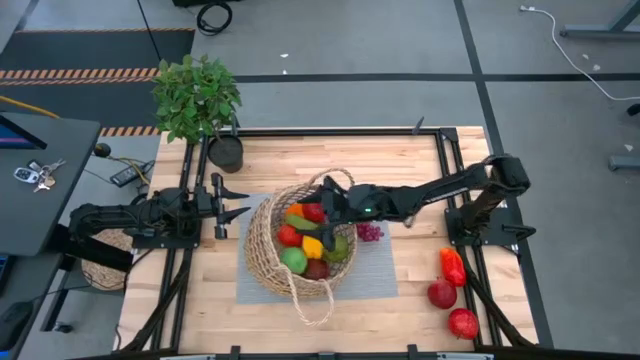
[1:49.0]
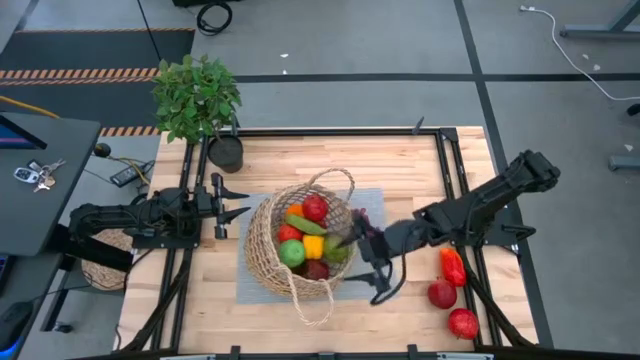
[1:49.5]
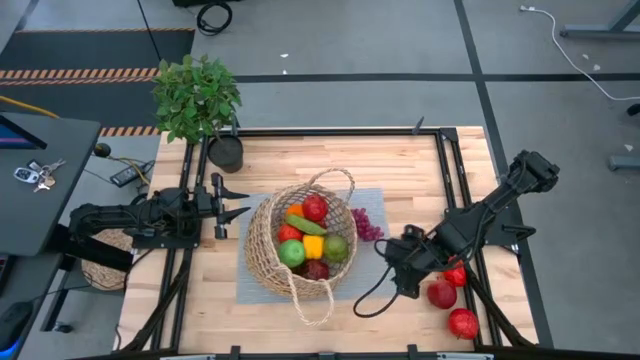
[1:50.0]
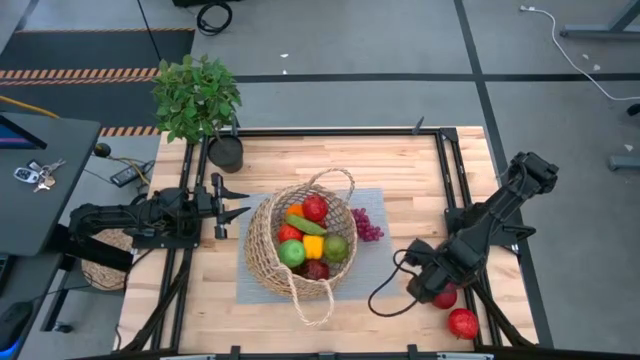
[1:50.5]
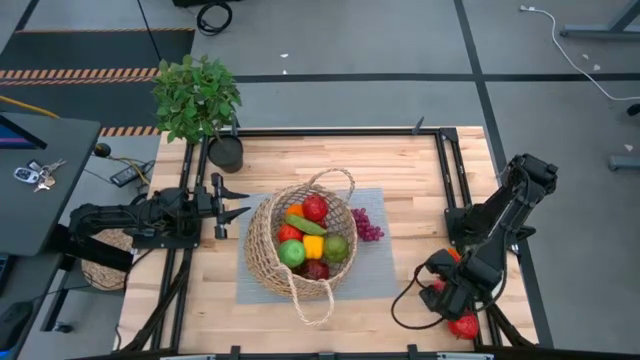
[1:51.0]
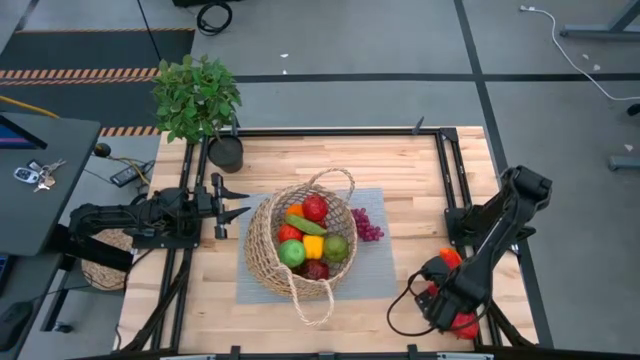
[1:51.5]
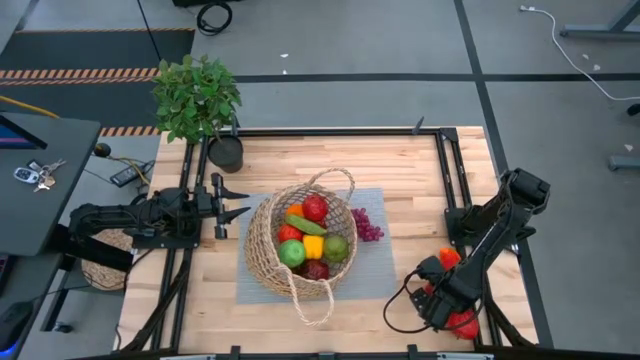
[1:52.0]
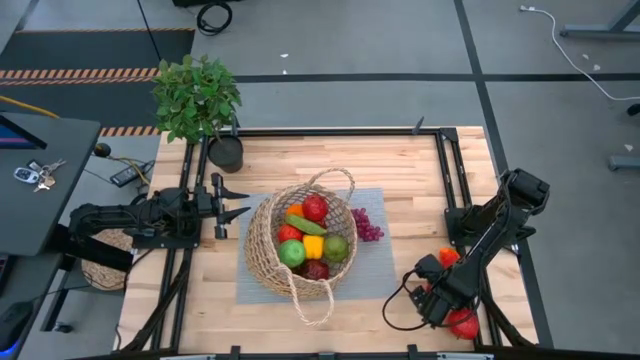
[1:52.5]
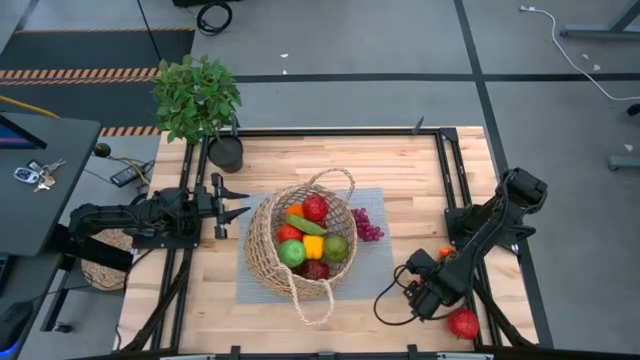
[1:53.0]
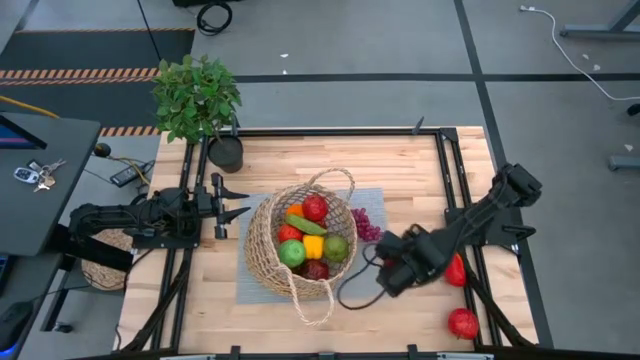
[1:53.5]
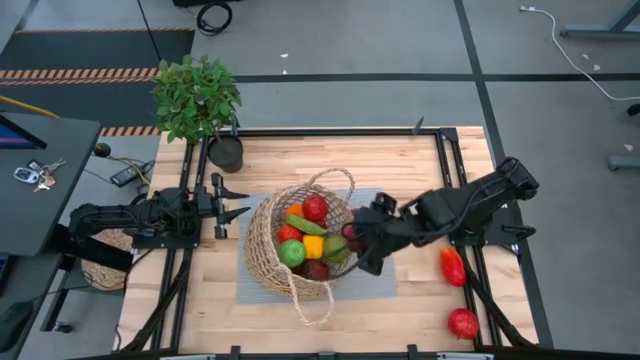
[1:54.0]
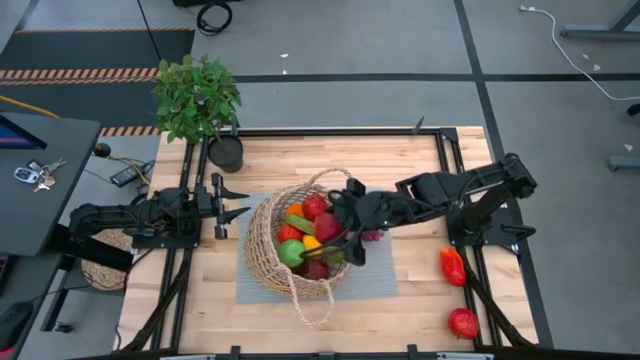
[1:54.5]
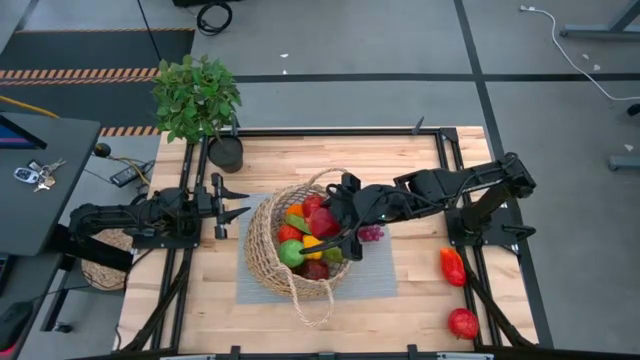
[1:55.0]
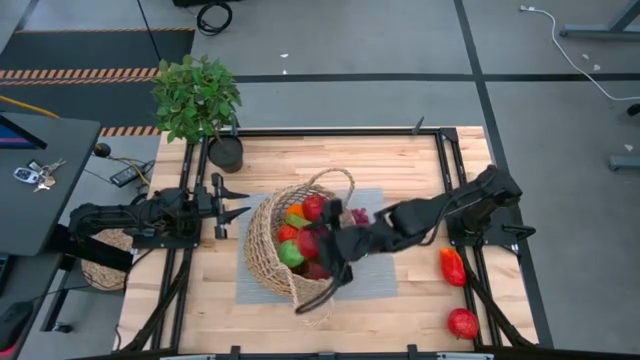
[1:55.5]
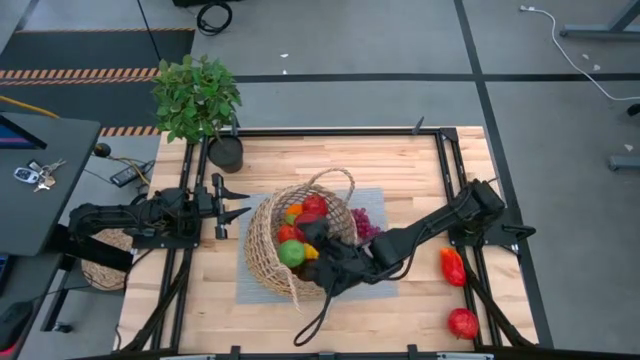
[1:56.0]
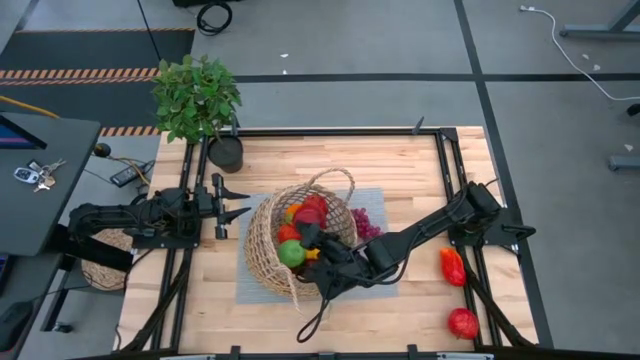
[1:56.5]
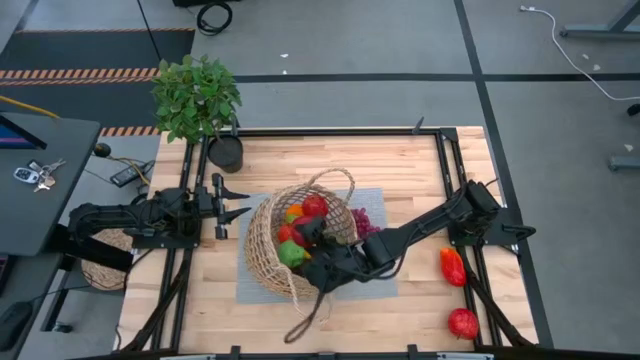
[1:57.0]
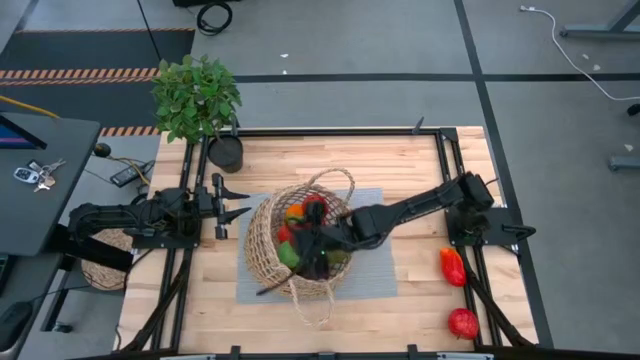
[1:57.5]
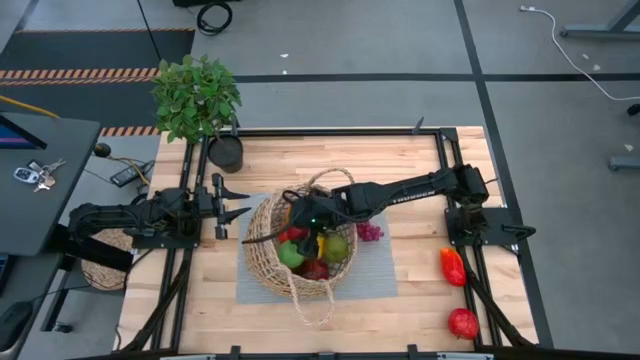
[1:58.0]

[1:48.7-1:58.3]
Task: Build produce basket
Put the pomegranate in the basket

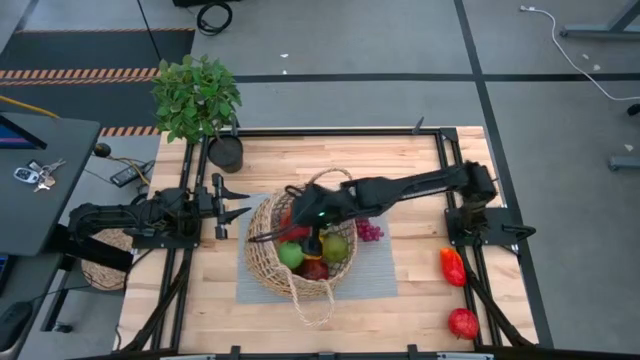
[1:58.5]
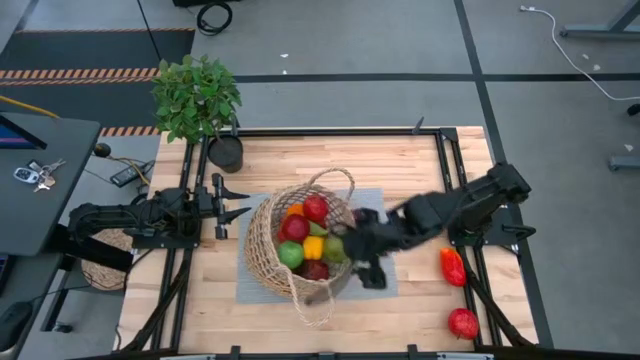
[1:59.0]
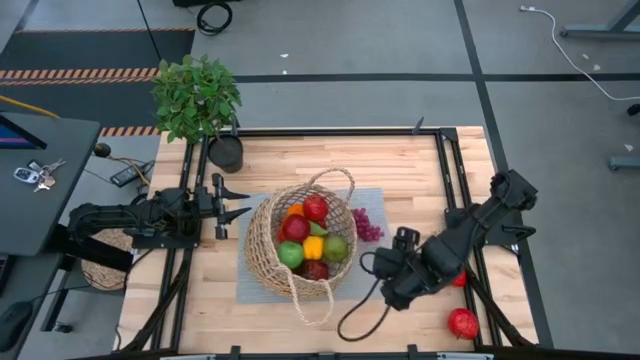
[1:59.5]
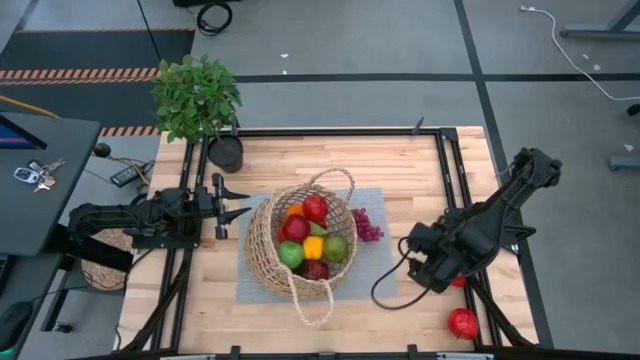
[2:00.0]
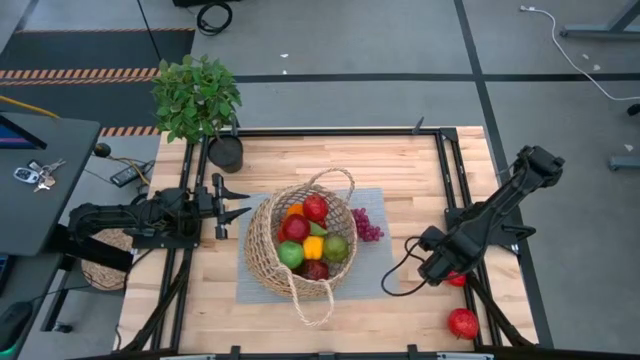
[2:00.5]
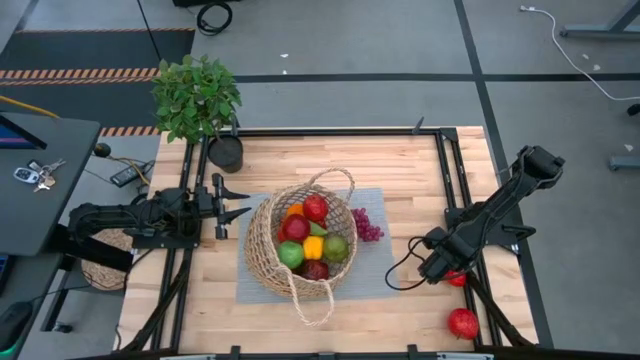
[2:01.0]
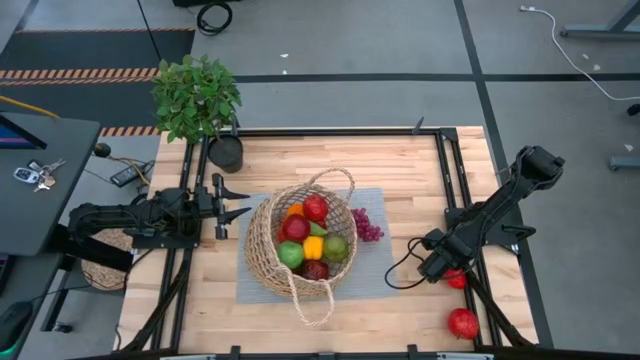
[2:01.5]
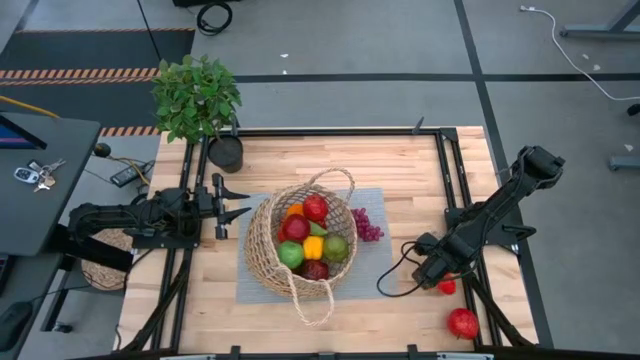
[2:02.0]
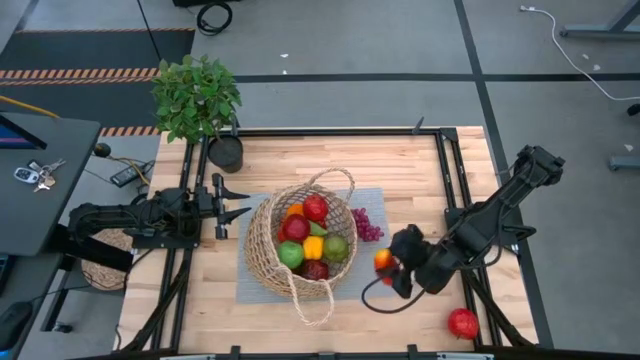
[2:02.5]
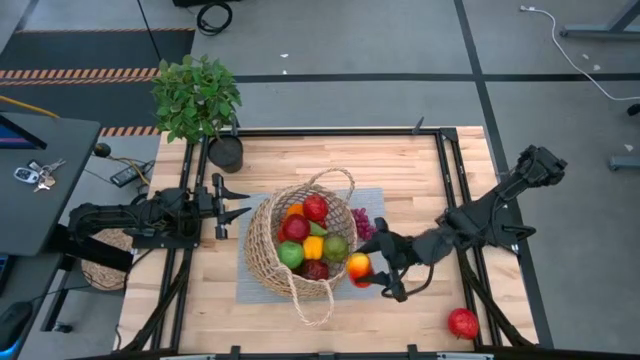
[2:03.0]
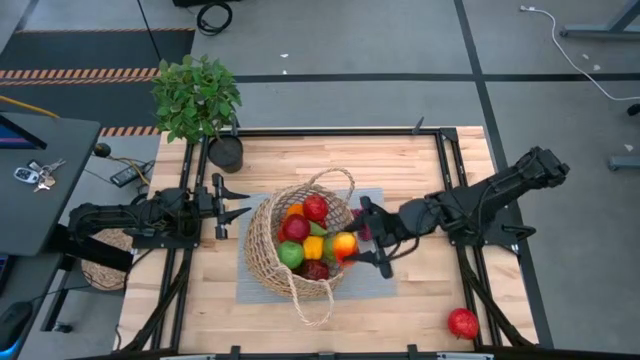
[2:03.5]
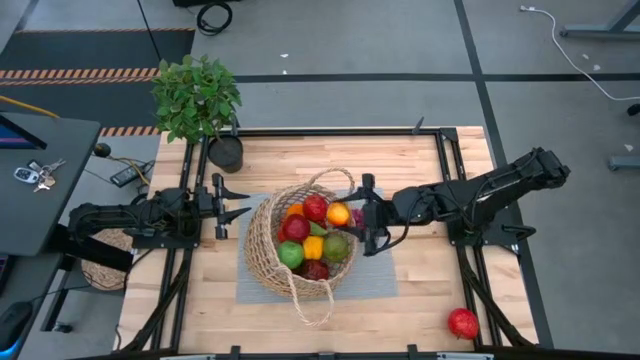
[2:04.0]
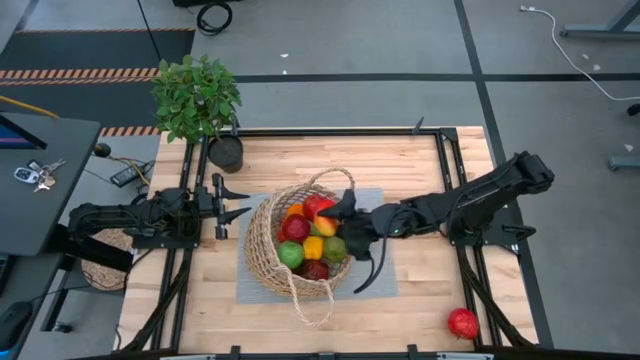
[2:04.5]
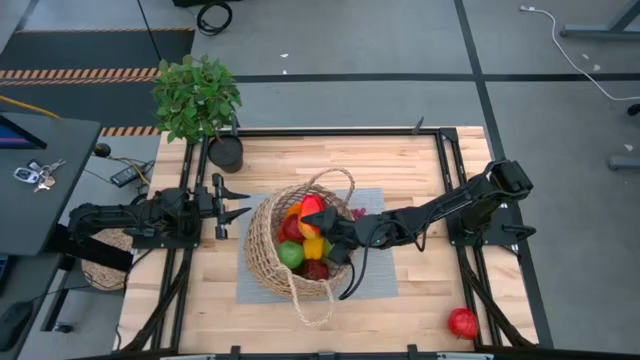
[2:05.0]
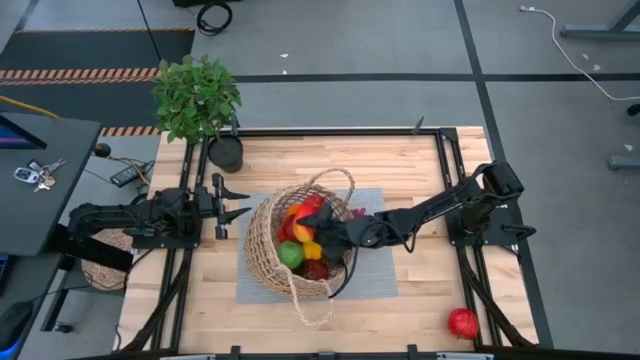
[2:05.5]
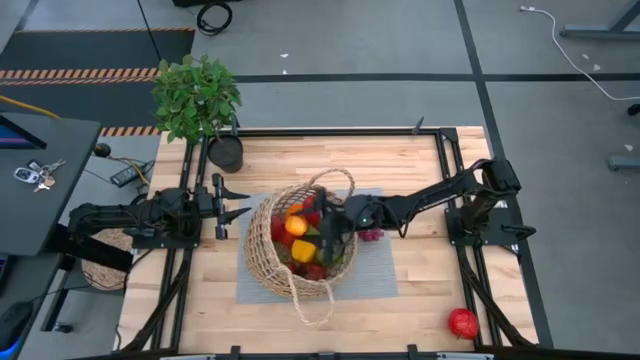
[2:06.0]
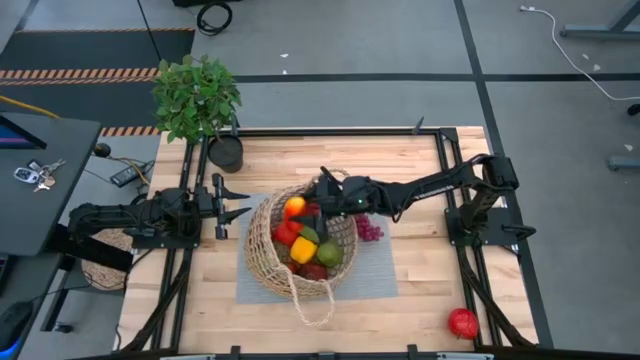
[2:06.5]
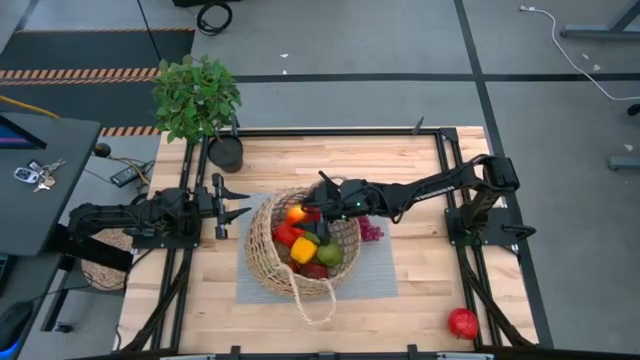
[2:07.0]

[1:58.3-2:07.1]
Put the mango in the basket

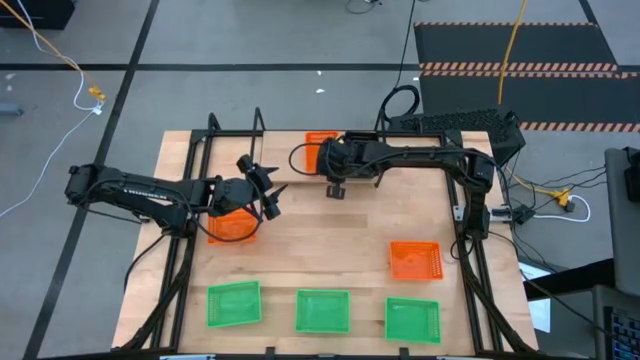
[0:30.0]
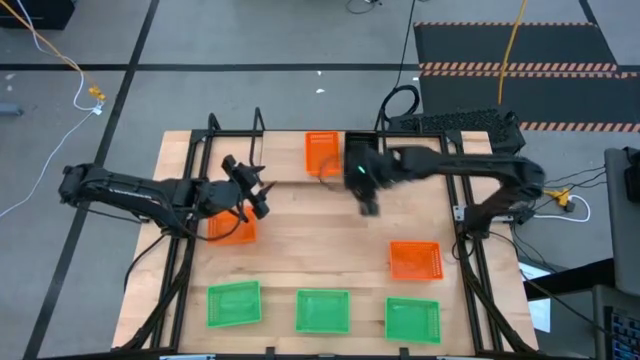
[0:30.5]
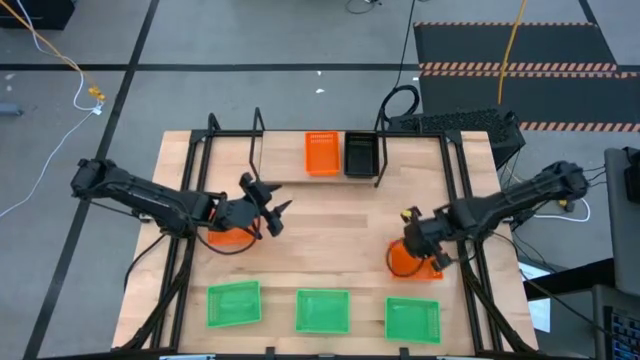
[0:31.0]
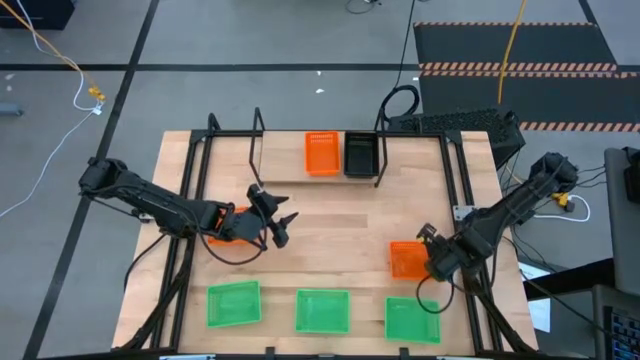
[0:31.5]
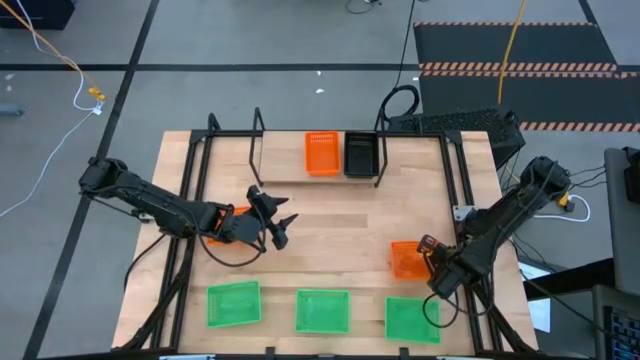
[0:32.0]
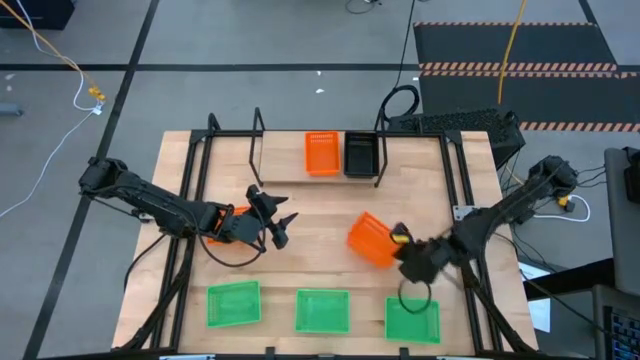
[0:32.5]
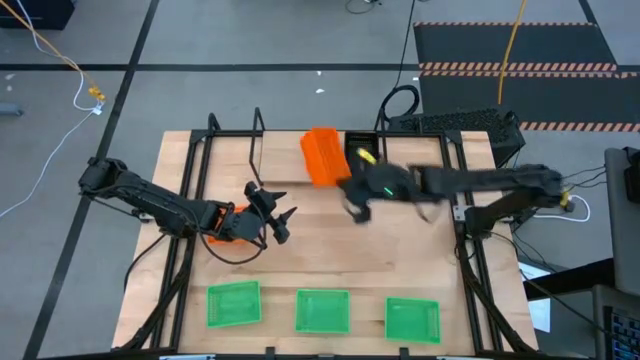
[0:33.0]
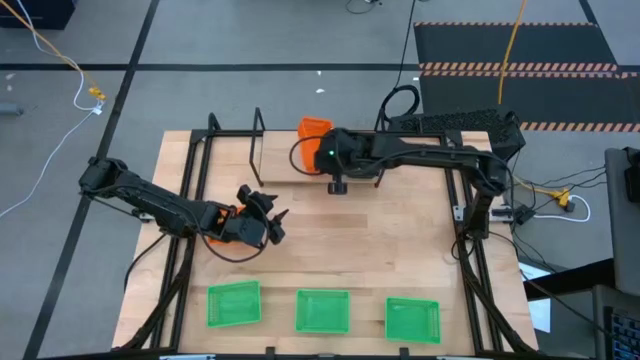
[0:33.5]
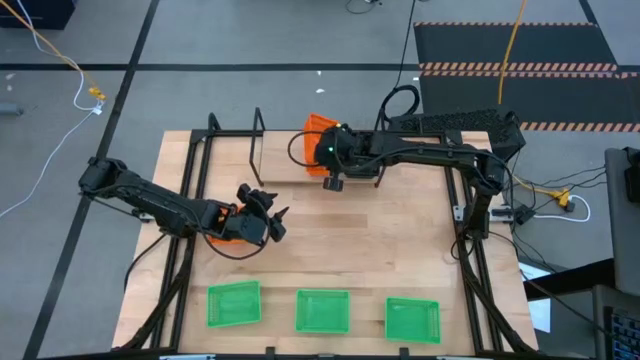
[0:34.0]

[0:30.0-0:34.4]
Task: Stack baskets on shelf by color
Stack the bottom orange bin on top of the orange bin on the shelf
